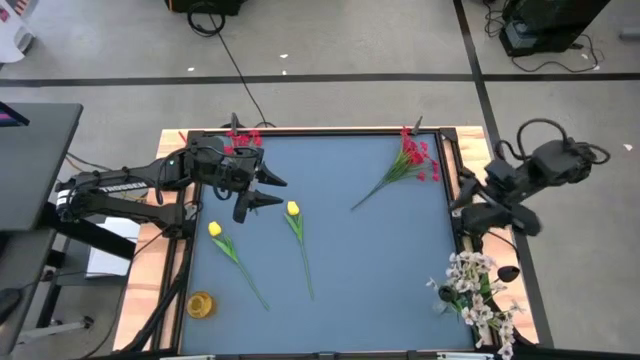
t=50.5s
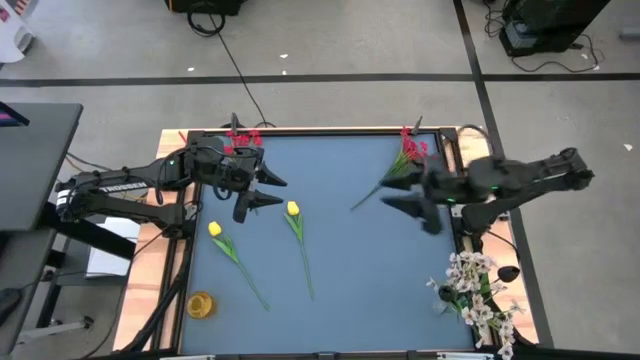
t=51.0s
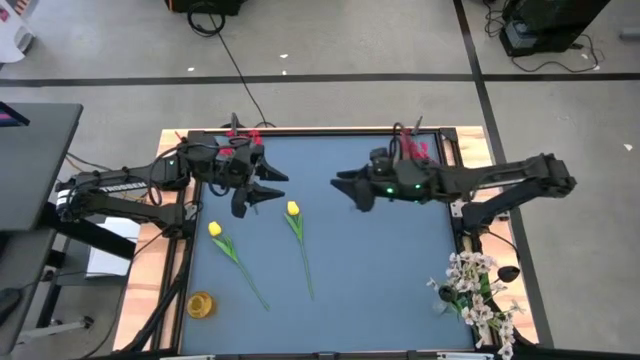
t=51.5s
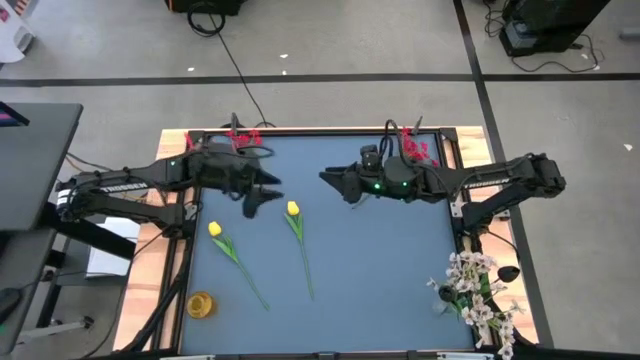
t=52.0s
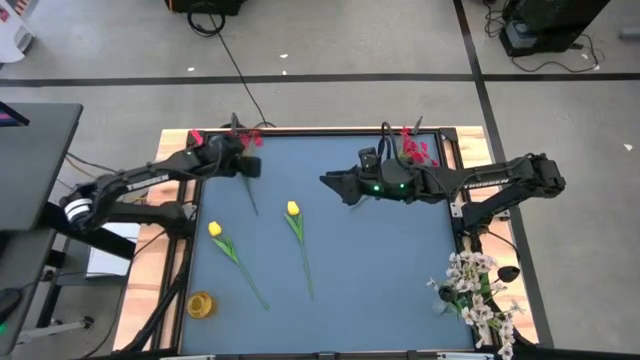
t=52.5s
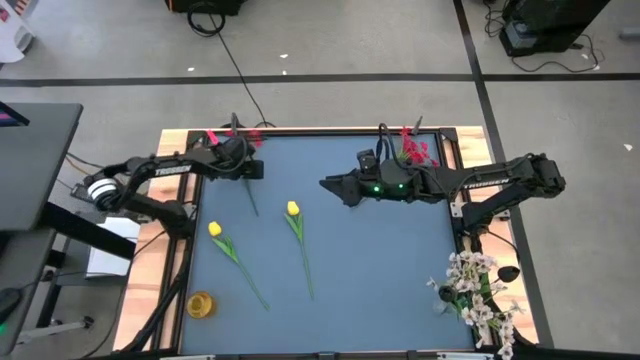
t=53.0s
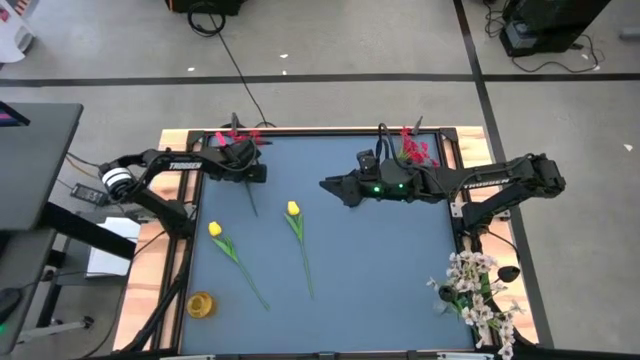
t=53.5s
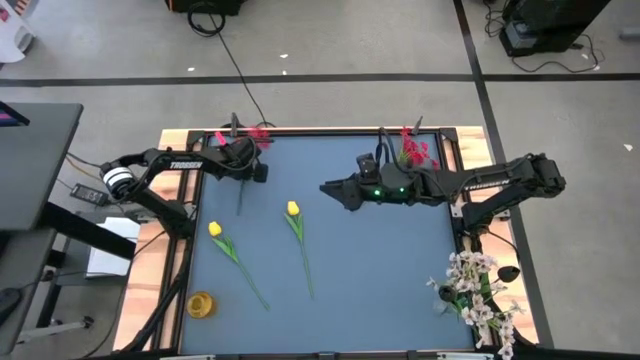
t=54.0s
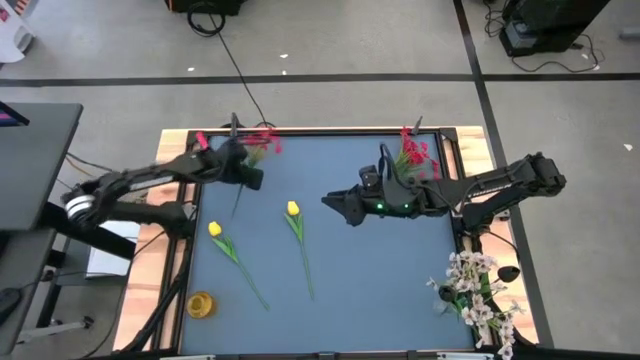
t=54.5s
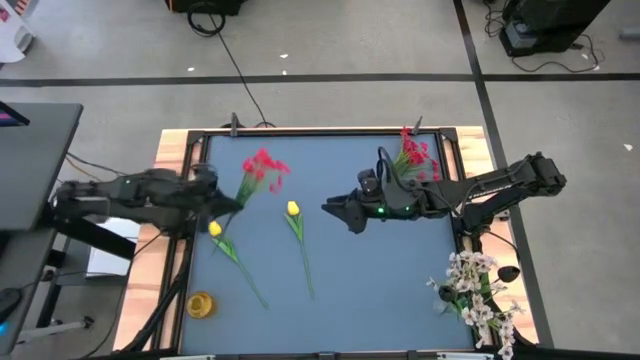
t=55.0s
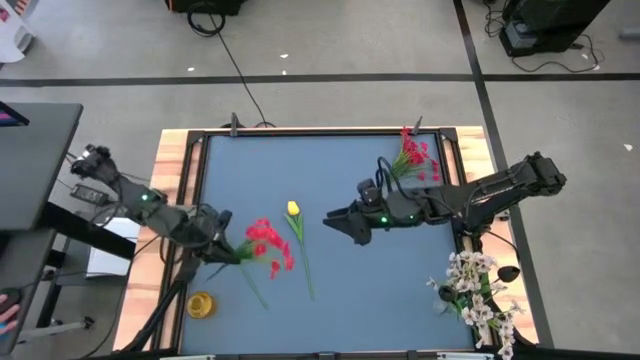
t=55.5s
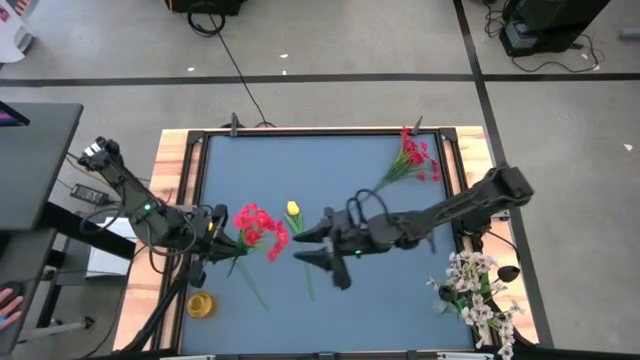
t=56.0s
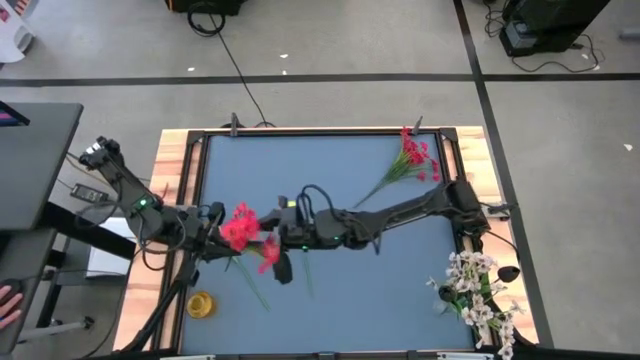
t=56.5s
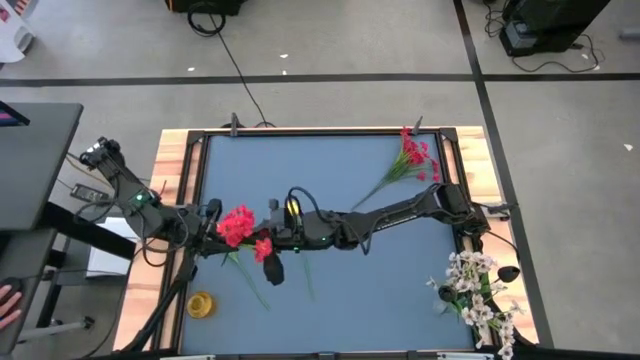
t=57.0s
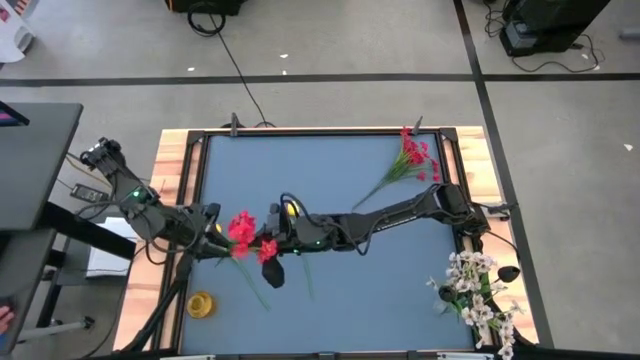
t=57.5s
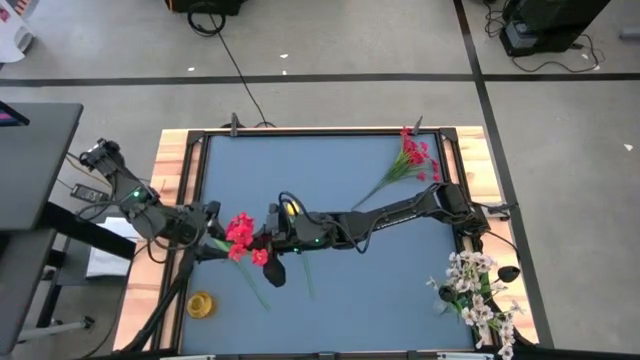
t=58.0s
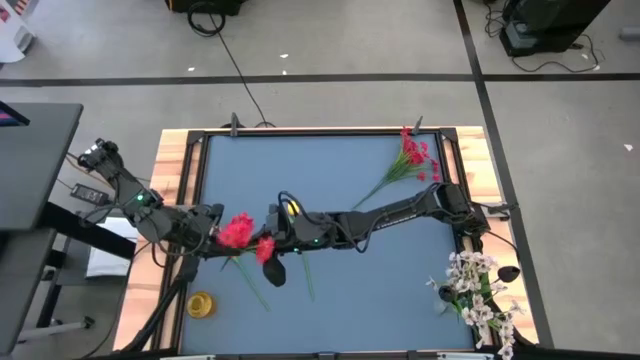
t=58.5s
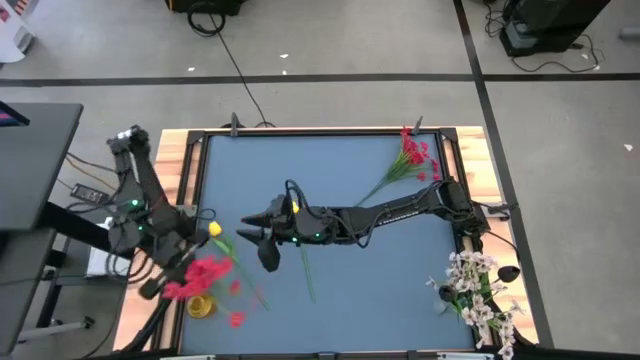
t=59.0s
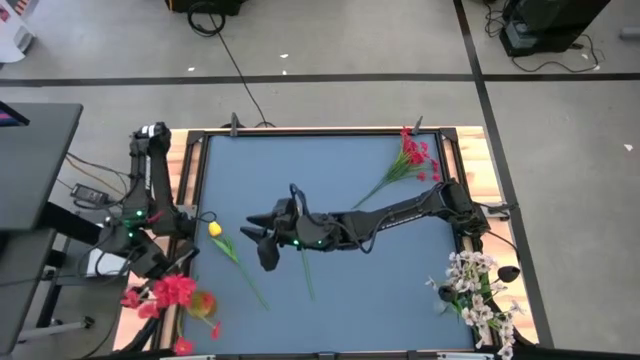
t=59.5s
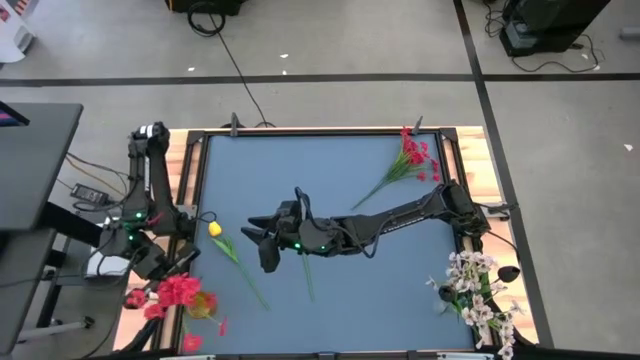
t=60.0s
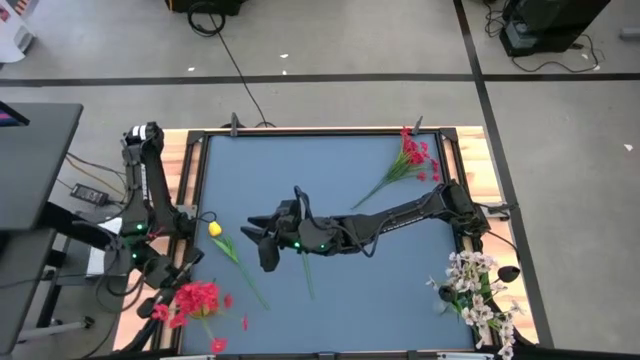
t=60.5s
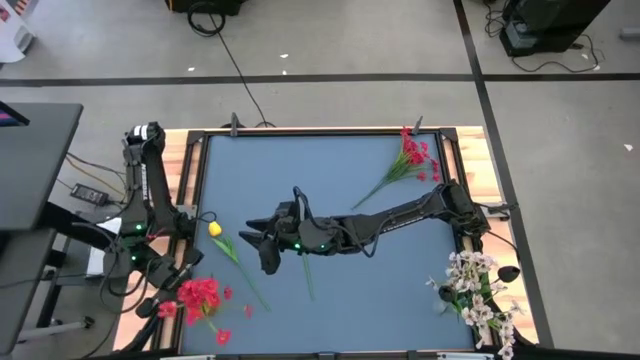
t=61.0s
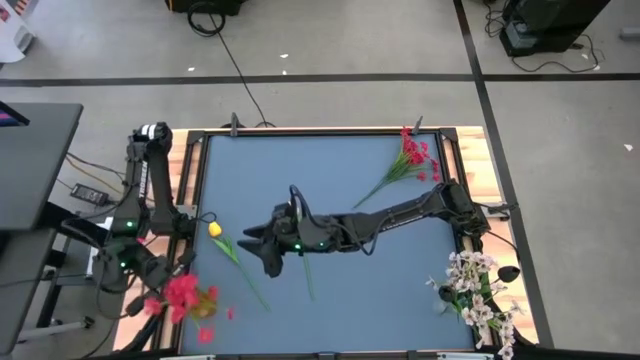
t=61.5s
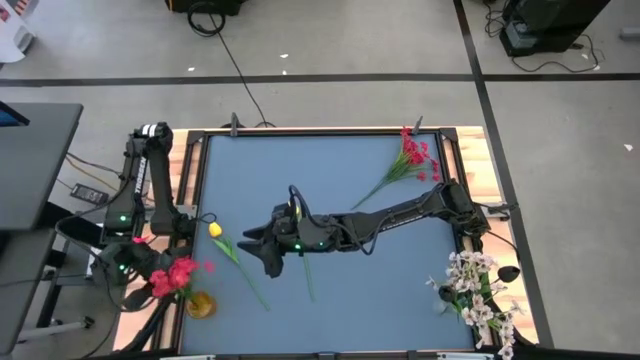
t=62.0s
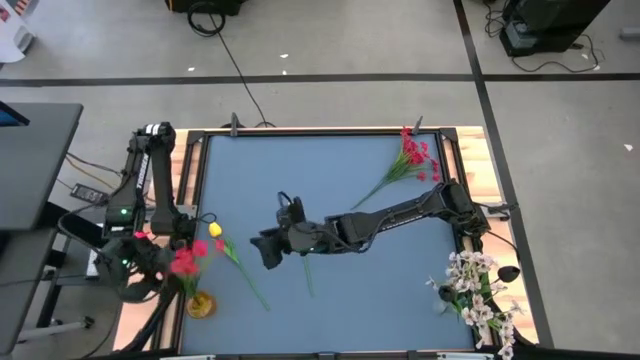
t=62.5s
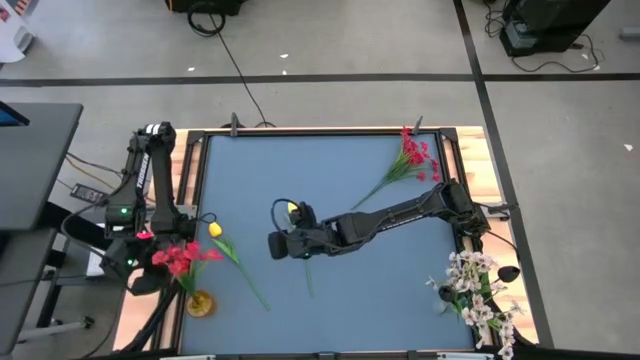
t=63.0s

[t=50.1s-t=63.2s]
Task: Sort flowers into vase by color
Put the left red flowers into the yellow vase

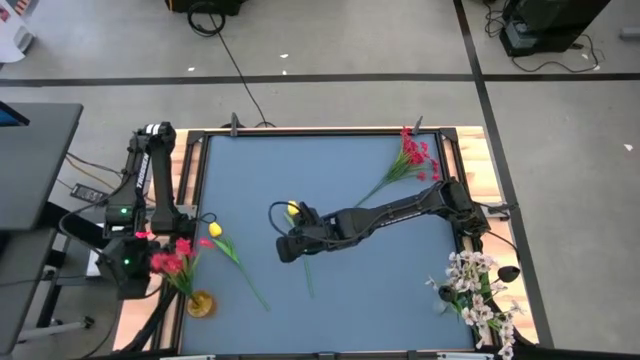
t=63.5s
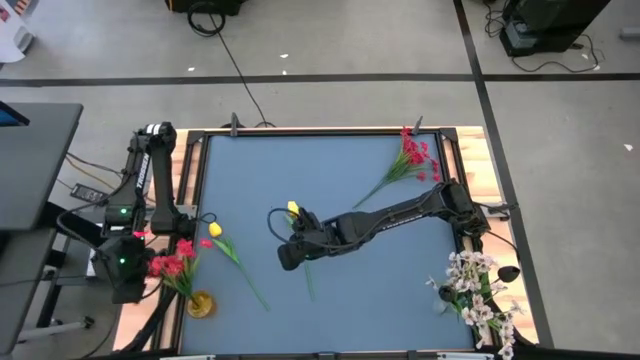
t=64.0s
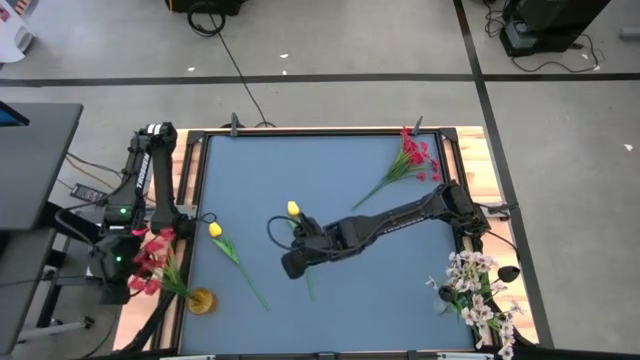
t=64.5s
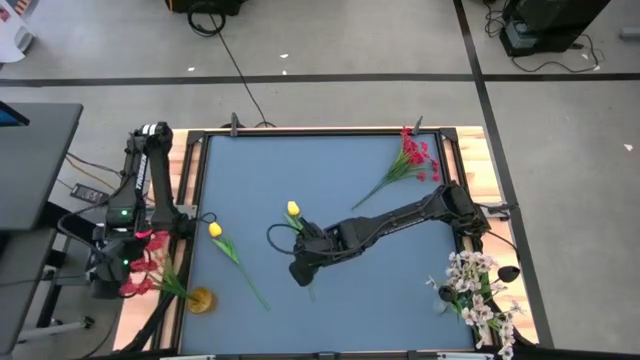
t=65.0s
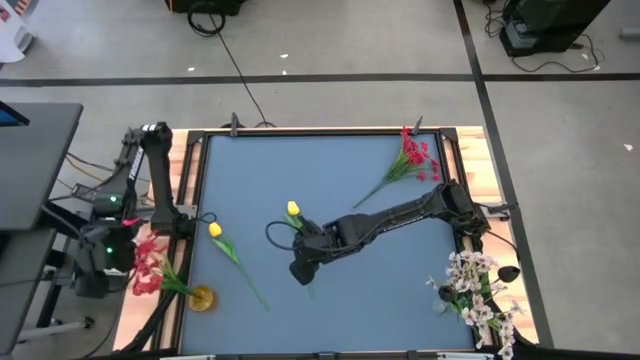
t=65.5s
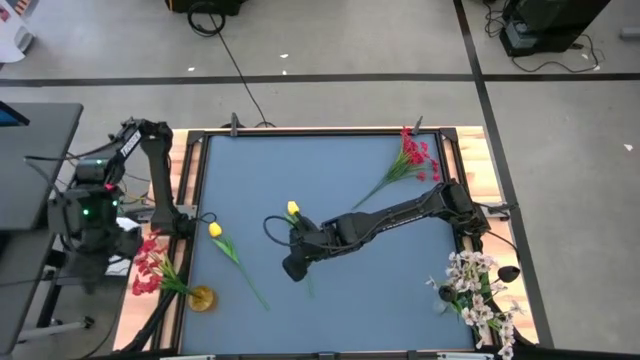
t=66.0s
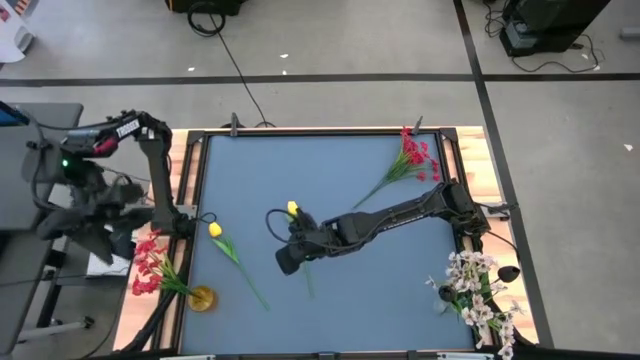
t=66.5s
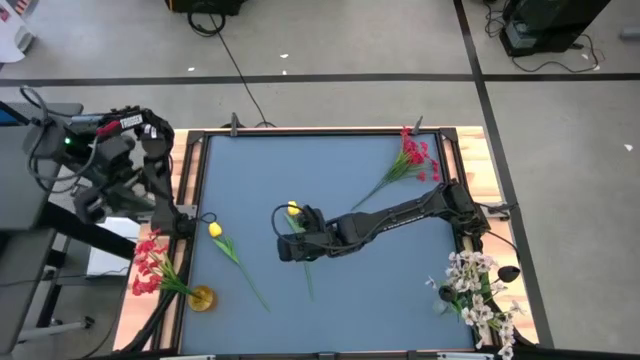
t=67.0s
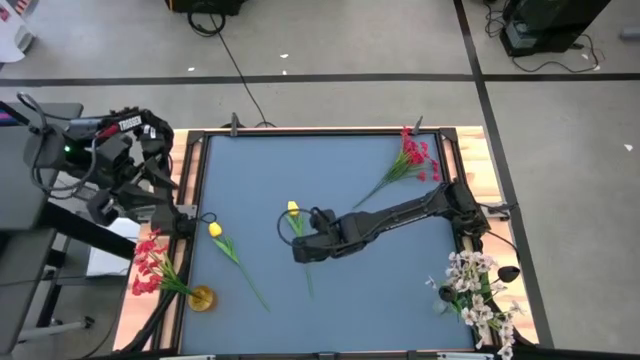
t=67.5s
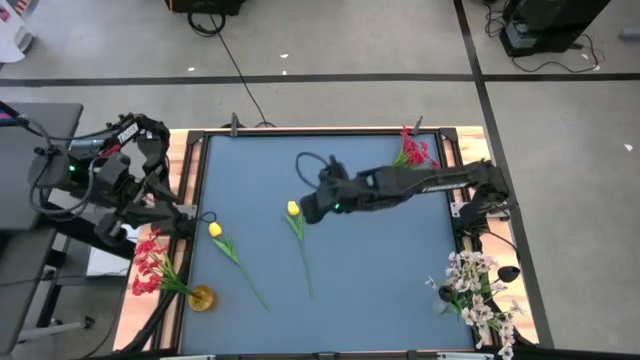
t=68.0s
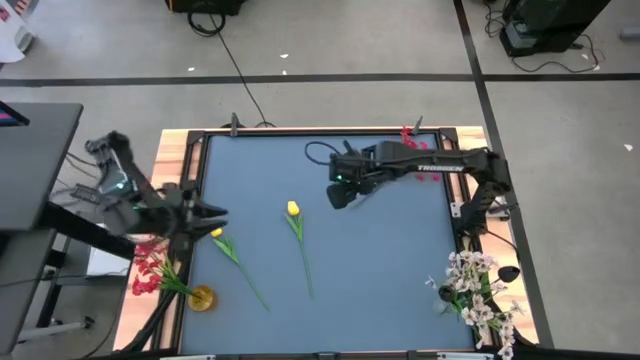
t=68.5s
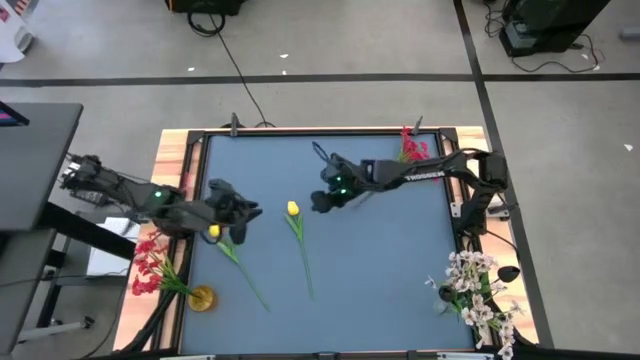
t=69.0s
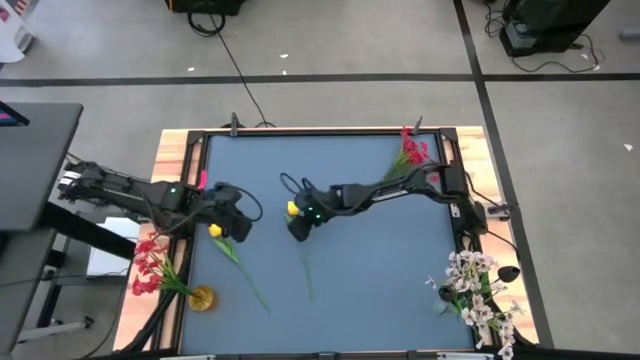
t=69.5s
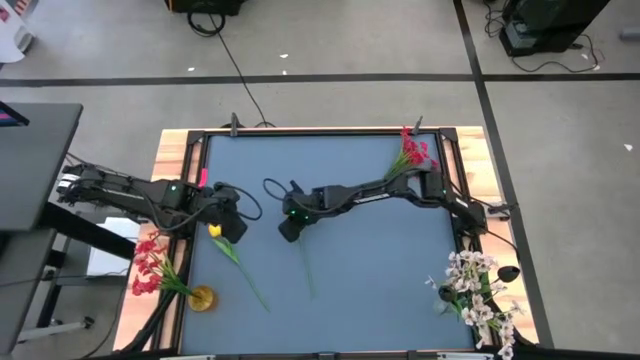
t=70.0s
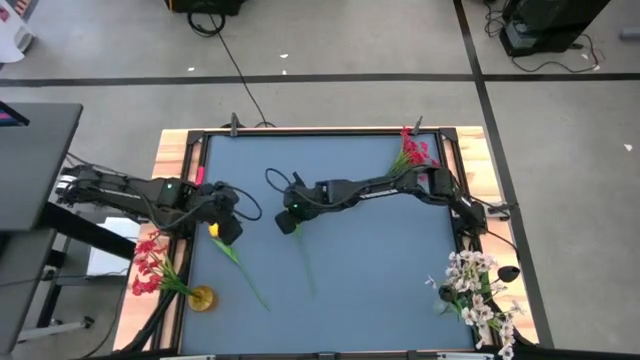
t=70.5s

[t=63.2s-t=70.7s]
Put the right yellow flower into the yellow vase
